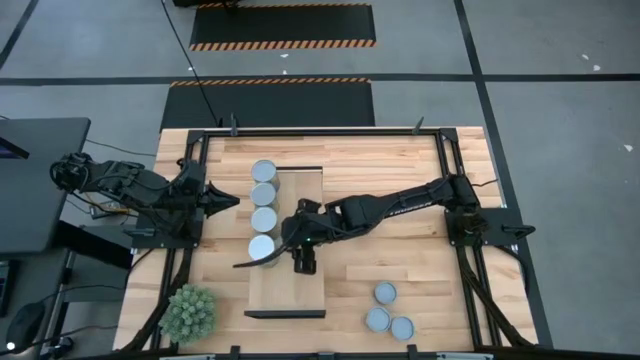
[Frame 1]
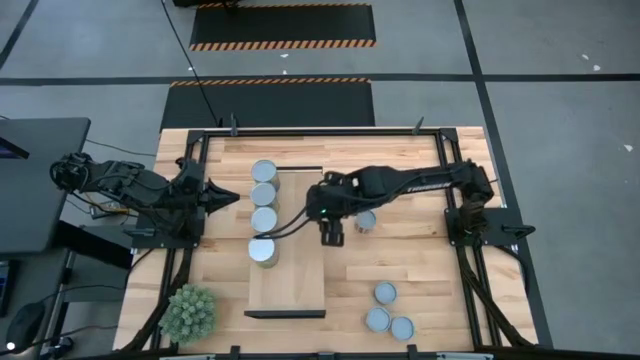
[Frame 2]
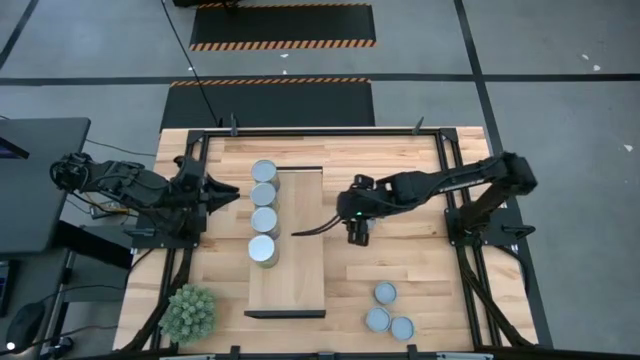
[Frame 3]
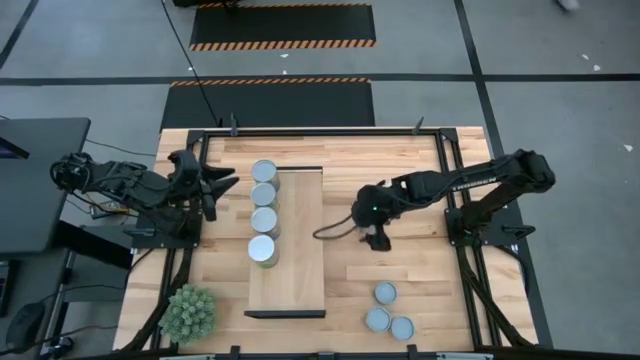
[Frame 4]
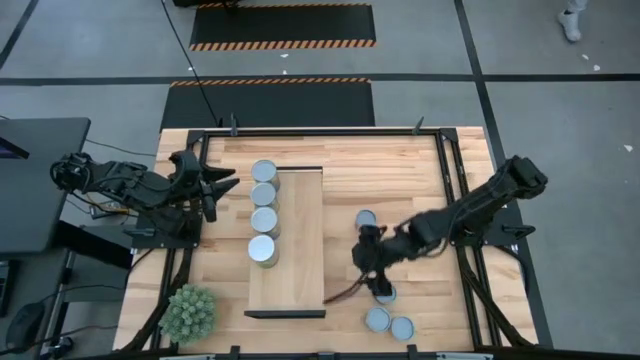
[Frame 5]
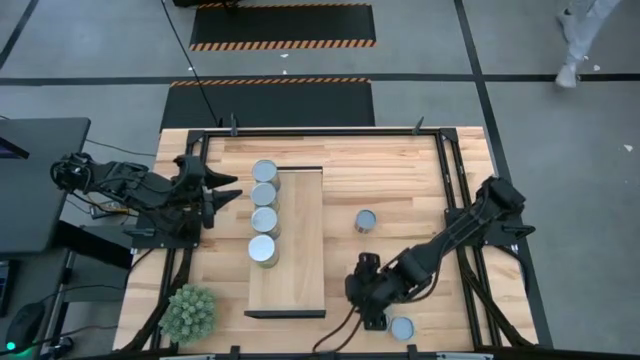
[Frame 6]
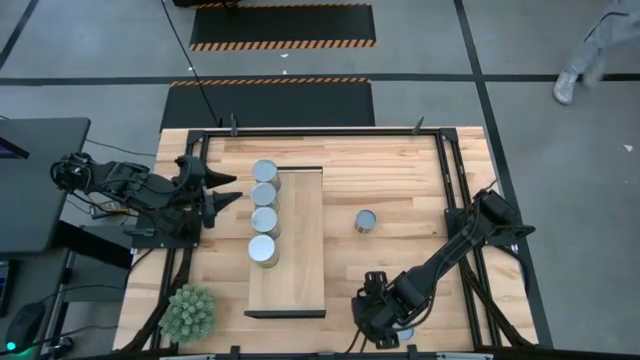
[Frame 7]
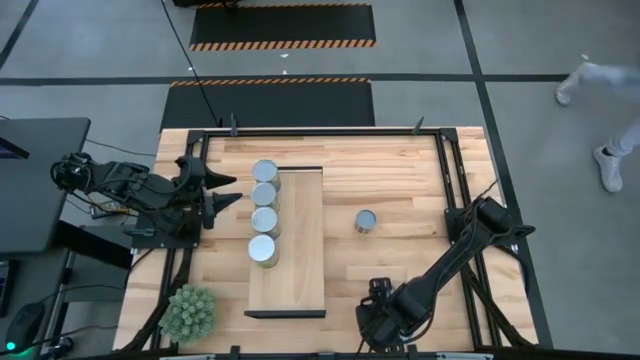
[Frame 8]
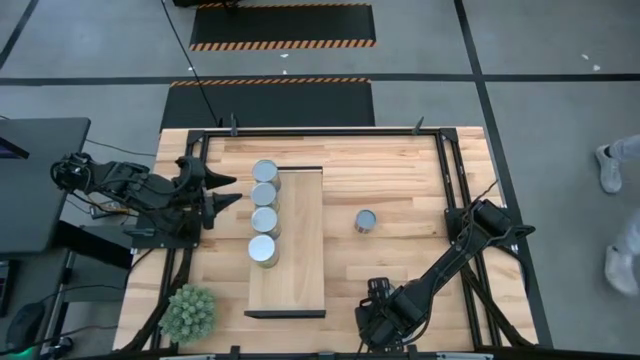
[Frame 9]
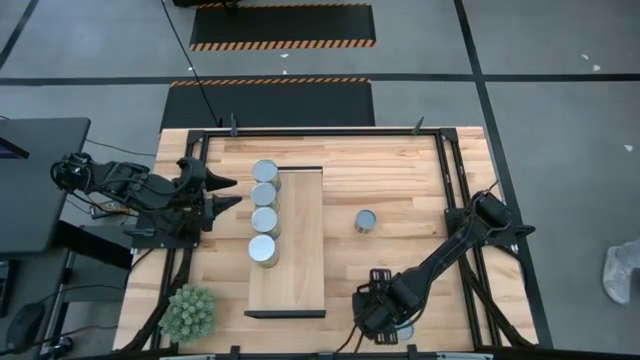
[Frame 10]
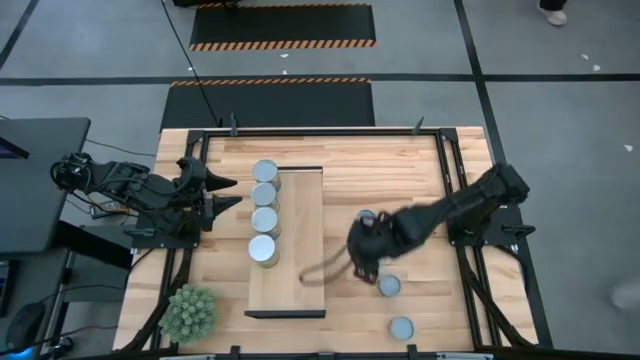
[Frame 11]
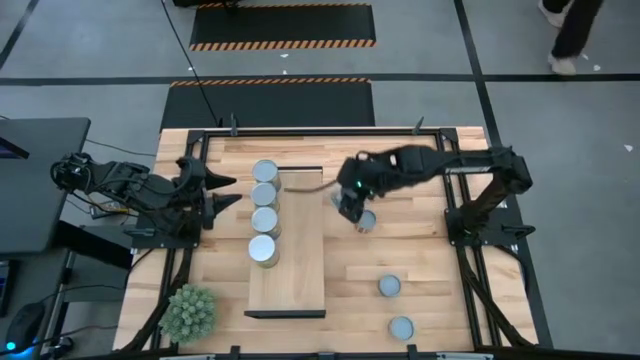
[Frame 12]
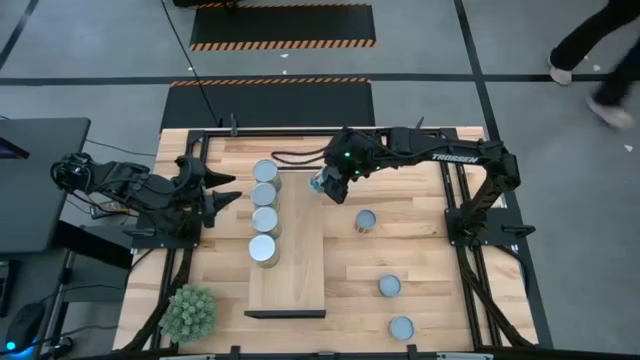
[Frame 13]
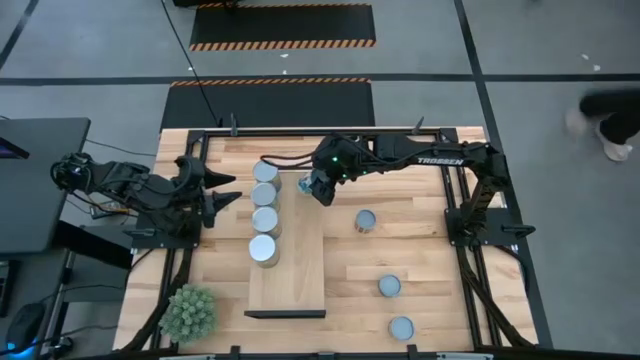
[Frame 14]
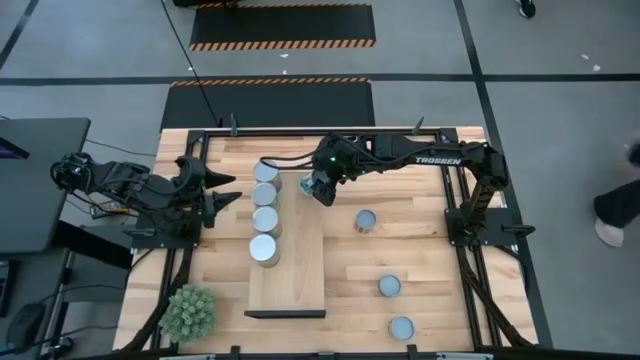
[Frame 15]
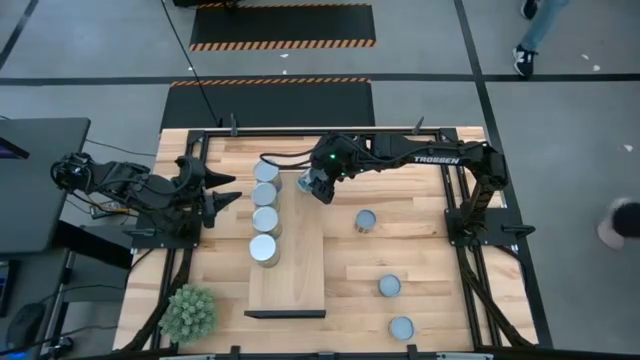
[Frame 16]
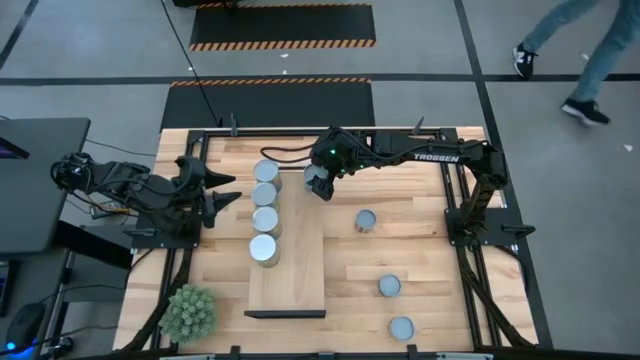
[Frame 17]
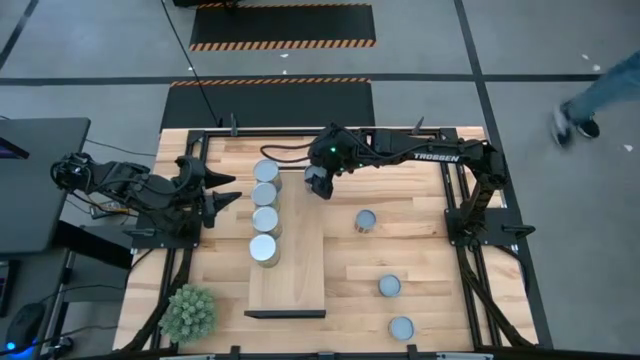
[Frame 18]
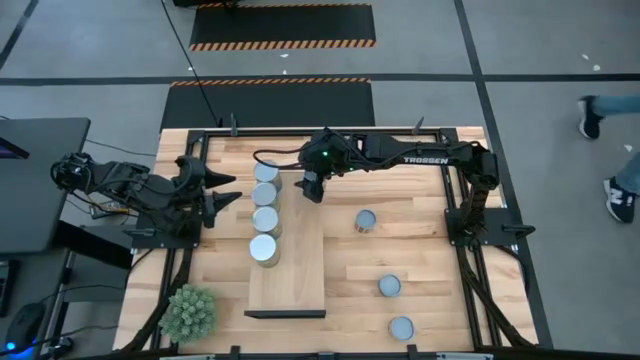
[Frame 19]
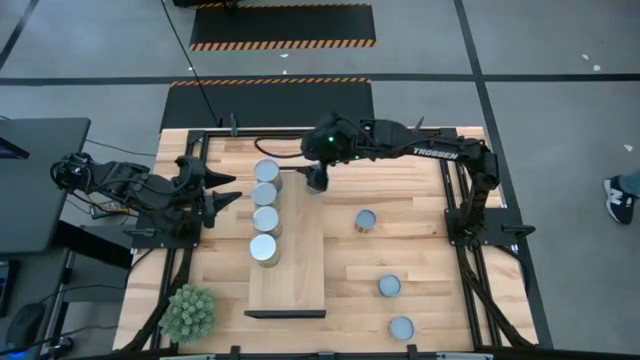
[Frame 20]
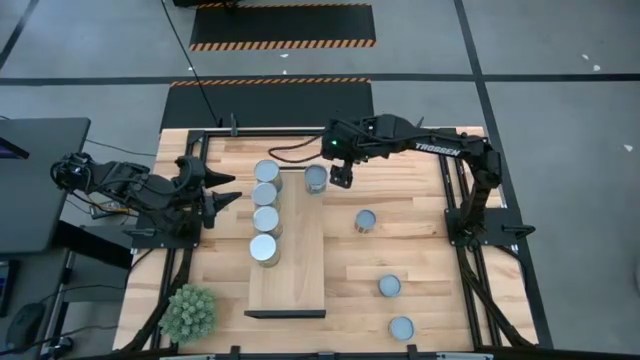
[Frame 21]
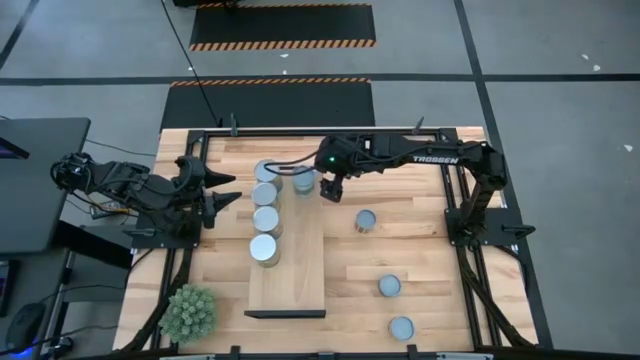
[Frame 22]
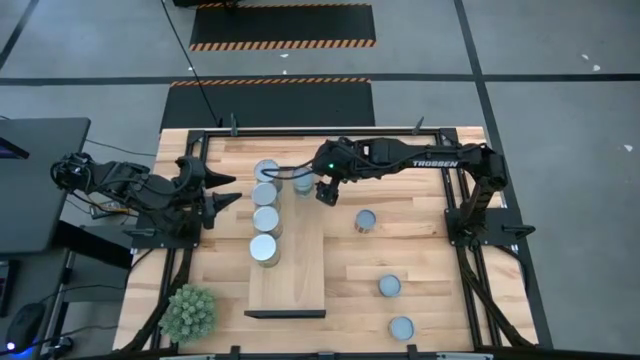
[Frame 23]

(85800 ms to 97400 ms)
Task: Pick and place cans onto a shelf
Put the canned mixed vegetables on the shelf

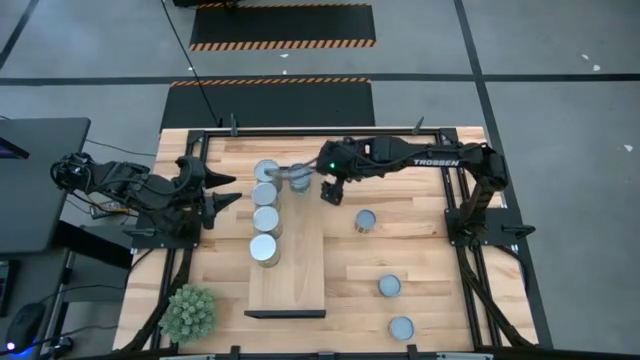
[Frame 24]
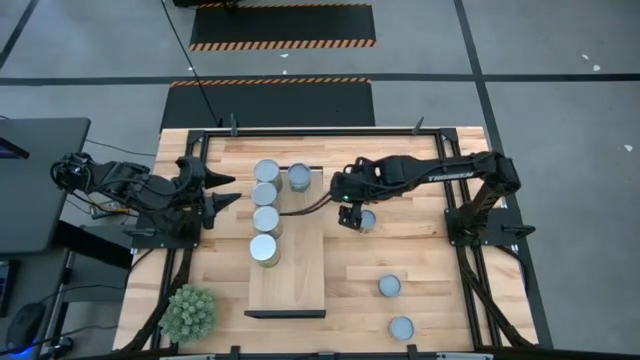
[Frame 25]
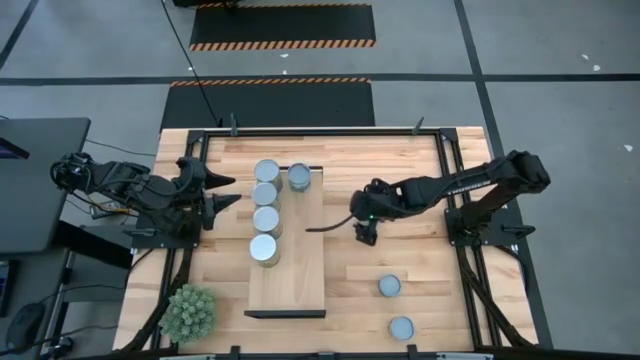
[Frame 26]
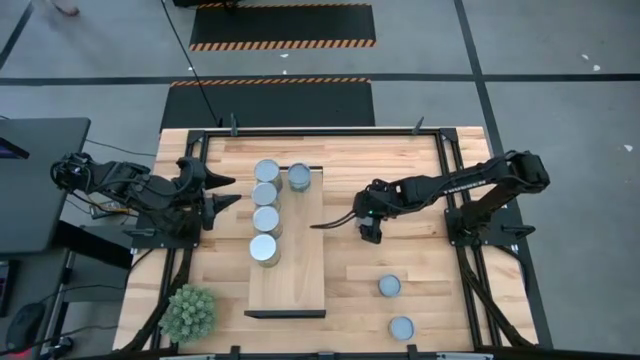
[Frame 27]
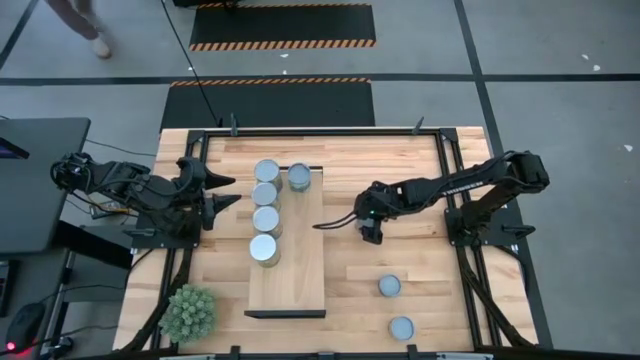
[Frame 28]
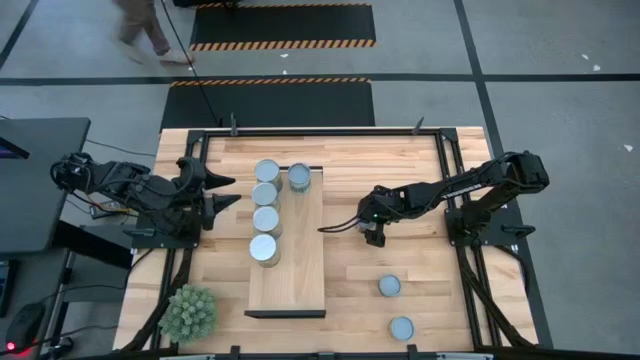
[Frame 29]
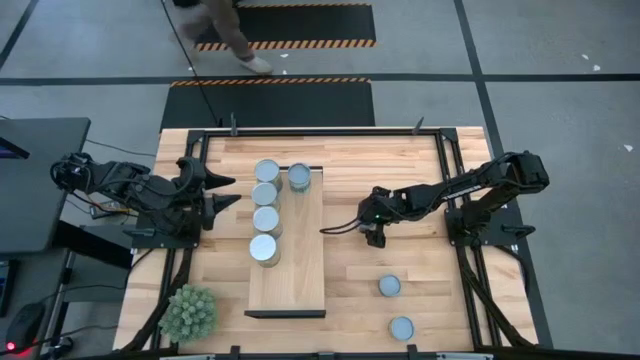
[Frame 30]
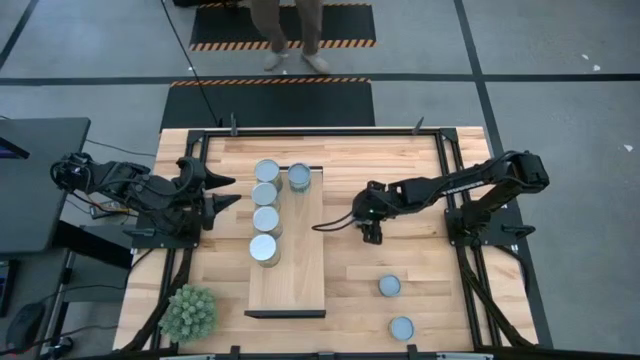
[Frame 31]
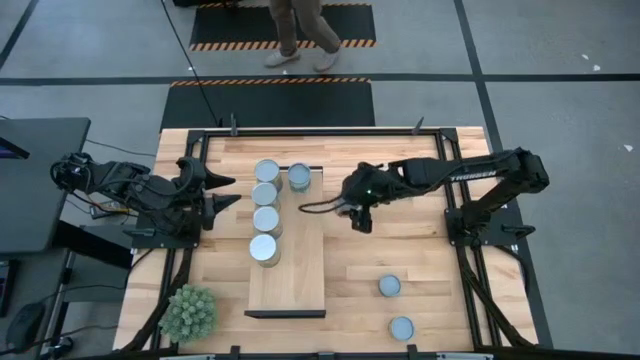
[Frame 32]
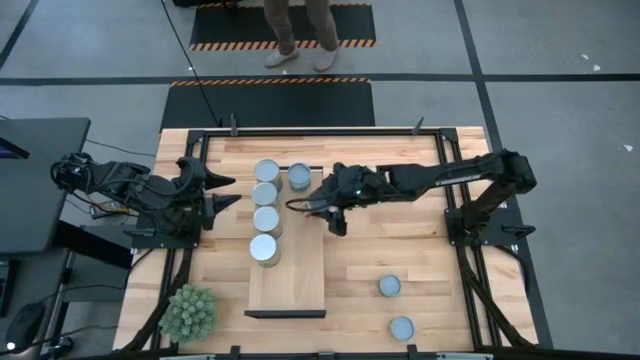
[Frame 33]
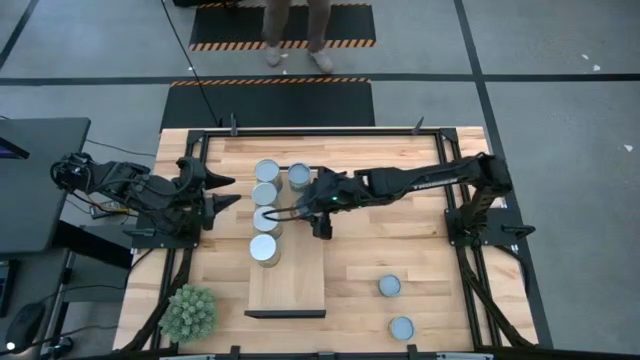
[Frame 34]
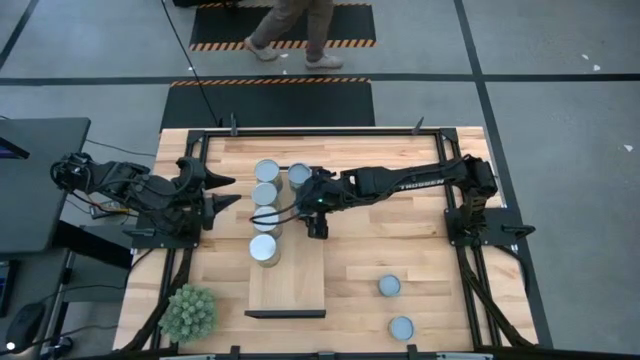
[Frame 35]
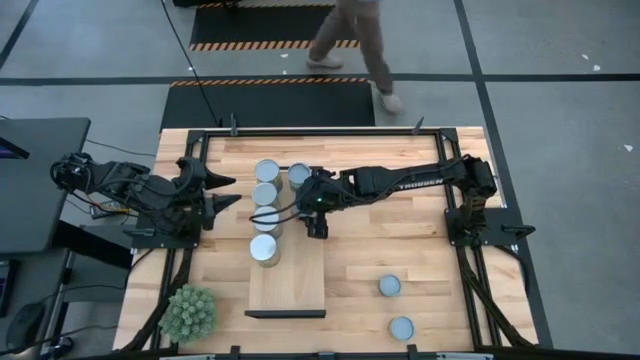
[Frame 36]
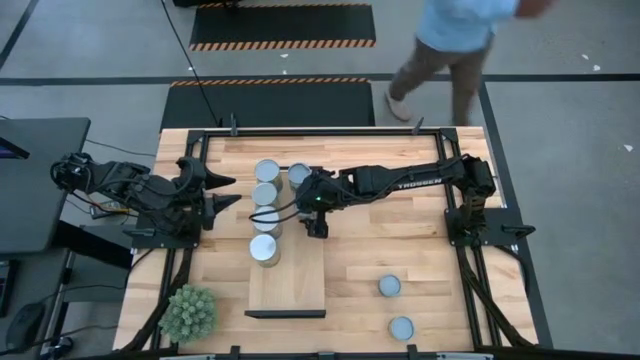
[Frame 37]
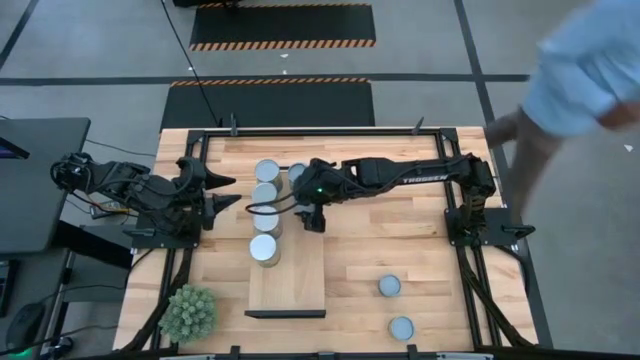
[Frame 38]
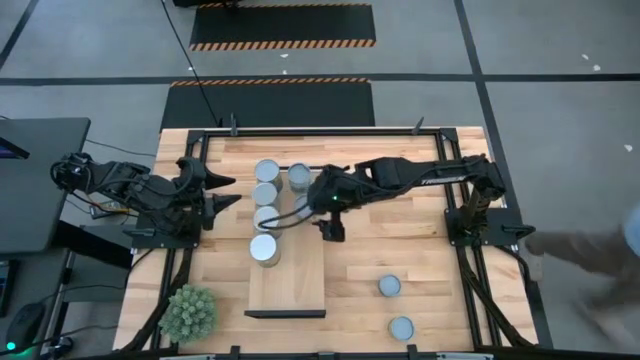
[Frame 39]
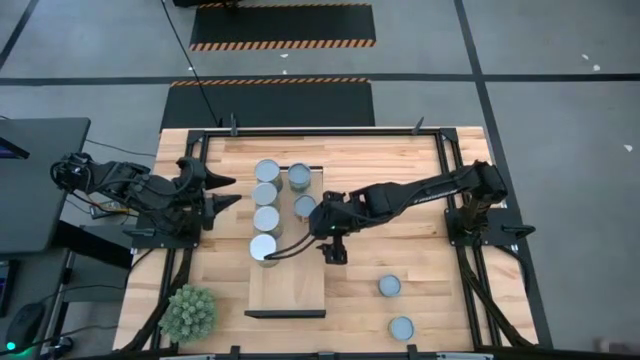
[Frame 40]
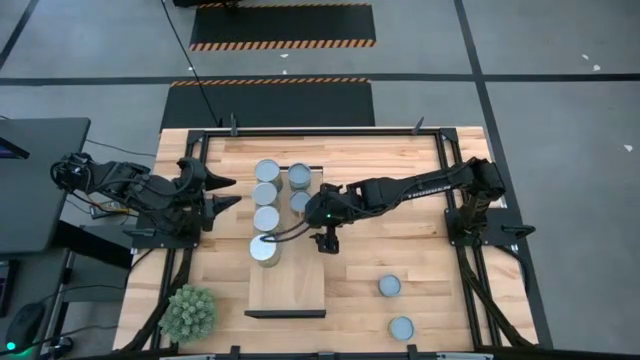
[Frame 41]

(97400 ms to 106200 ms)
Put the canned diced tomatoes on the shelf

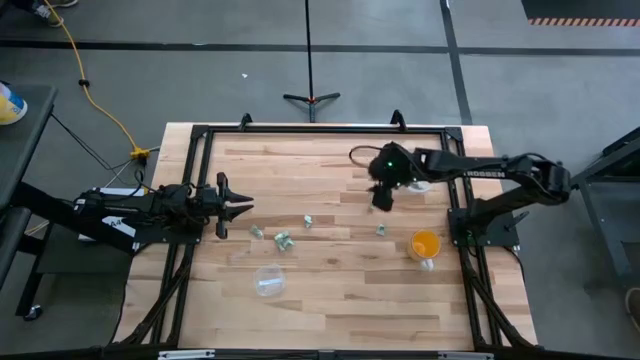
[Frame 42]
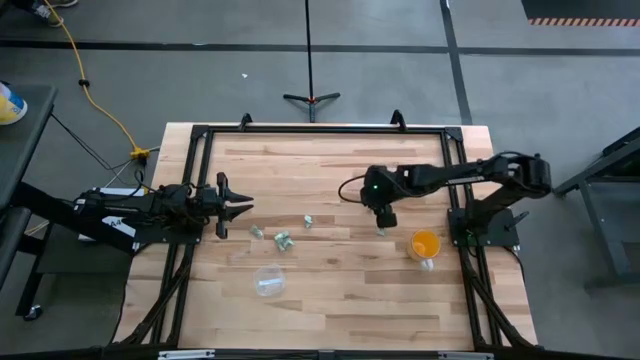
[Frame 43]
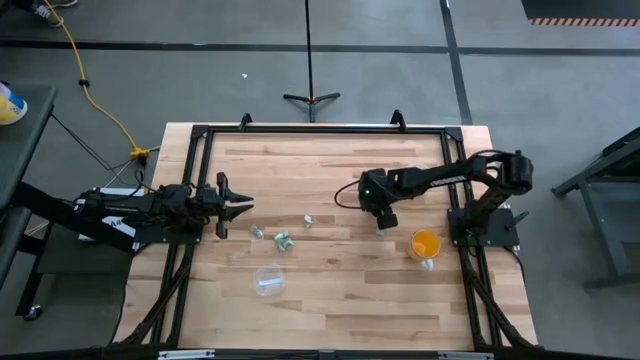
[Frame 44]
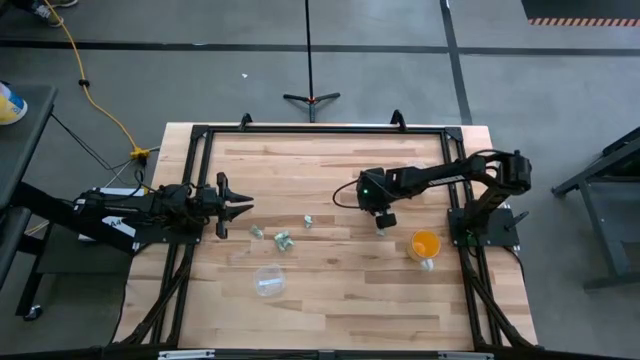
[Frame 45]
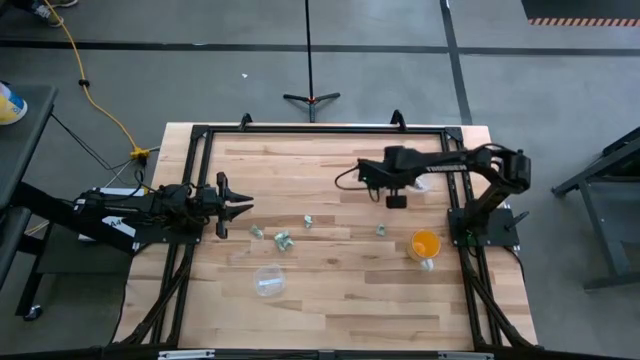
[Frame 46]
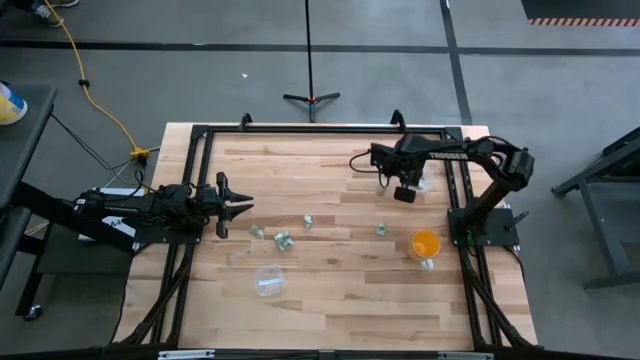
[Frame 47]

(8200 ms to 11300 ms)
Task: Pick and place Stevia / Truvia into bins
Put the stevia packet into the circular container
